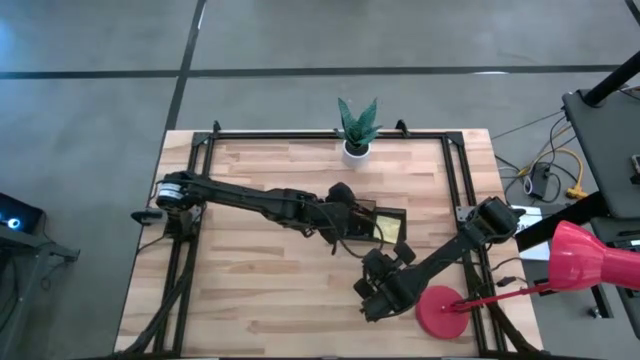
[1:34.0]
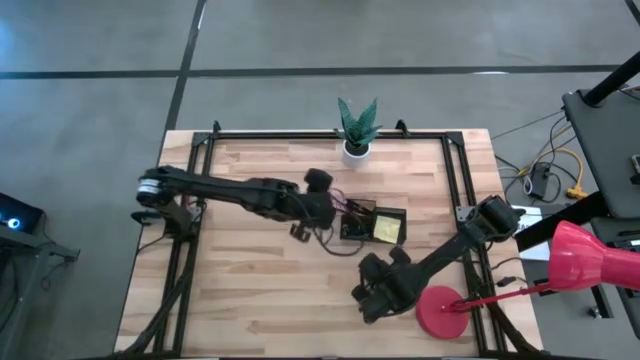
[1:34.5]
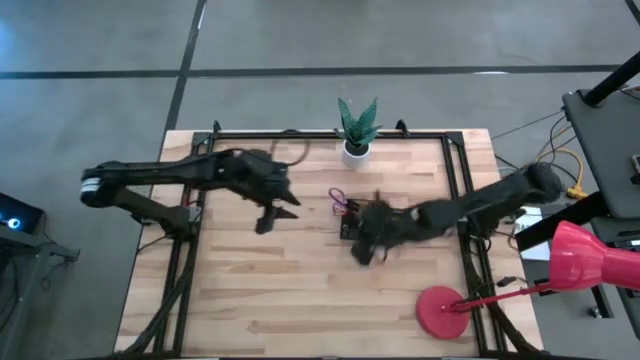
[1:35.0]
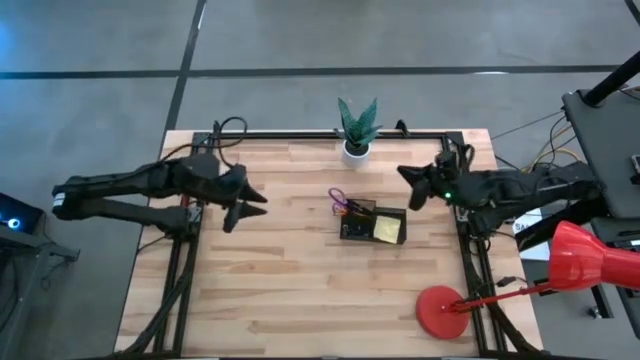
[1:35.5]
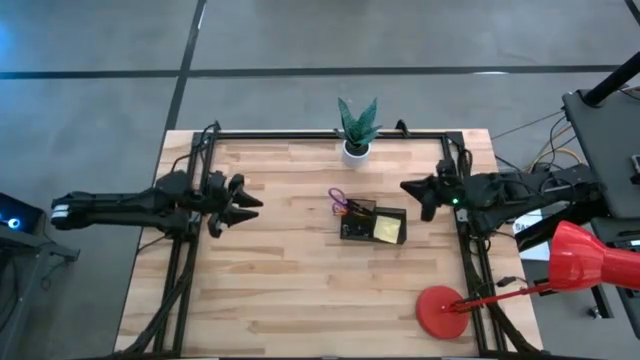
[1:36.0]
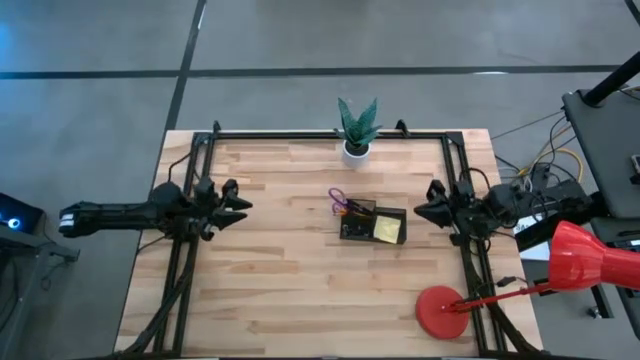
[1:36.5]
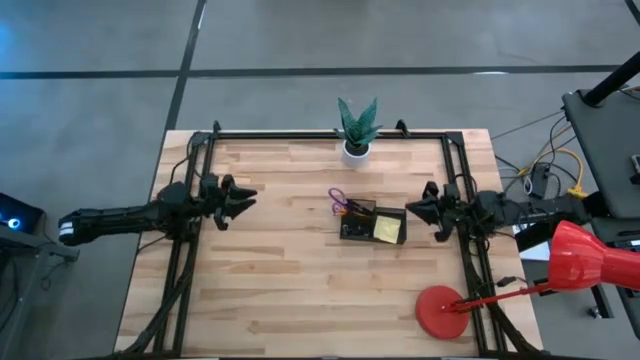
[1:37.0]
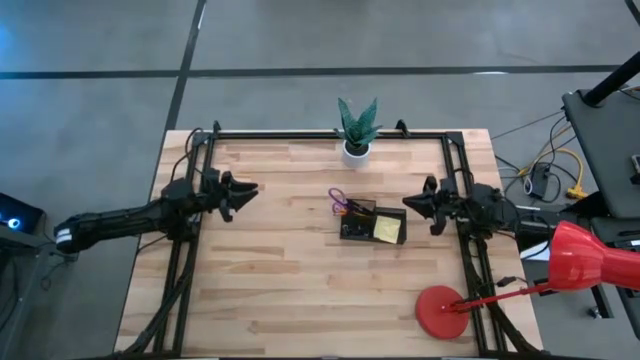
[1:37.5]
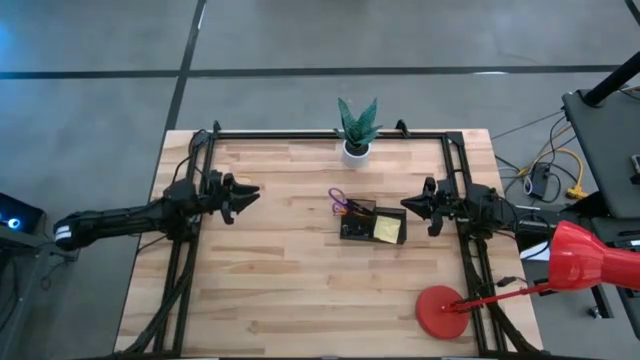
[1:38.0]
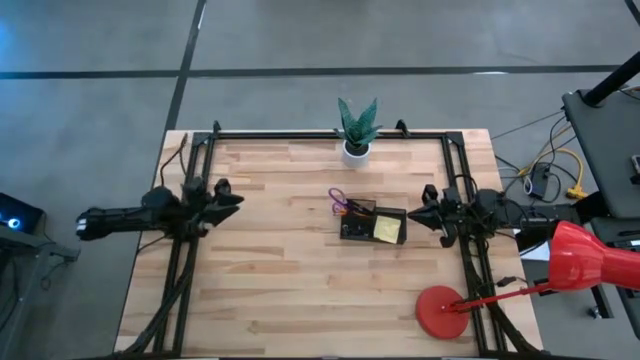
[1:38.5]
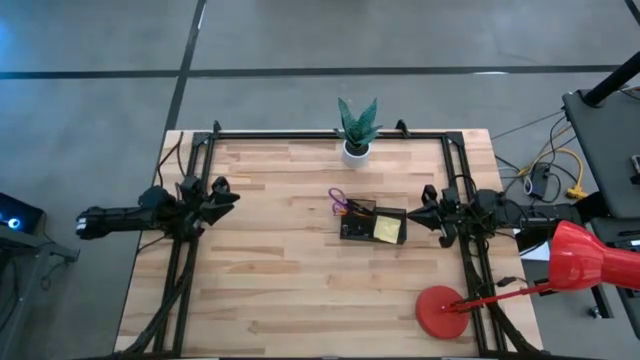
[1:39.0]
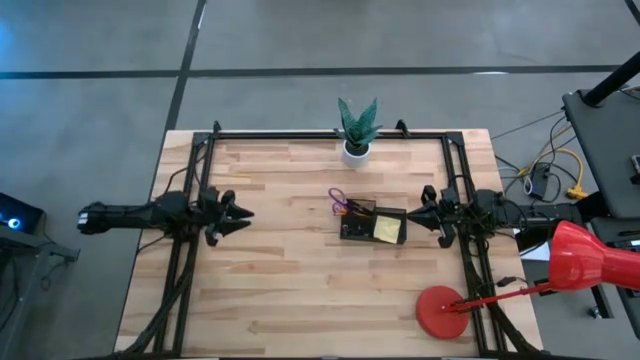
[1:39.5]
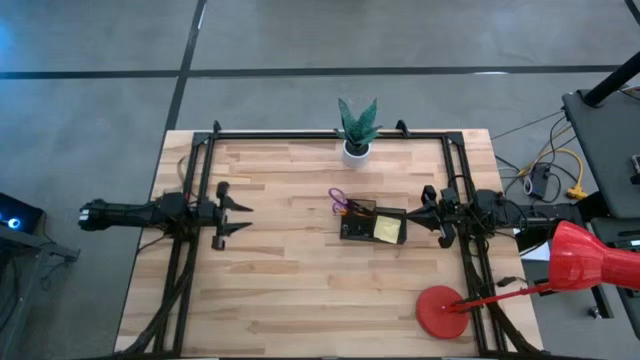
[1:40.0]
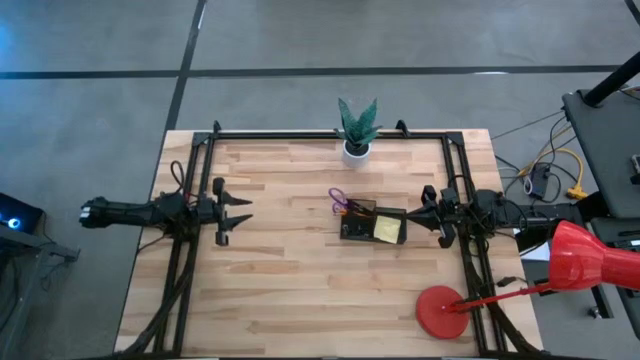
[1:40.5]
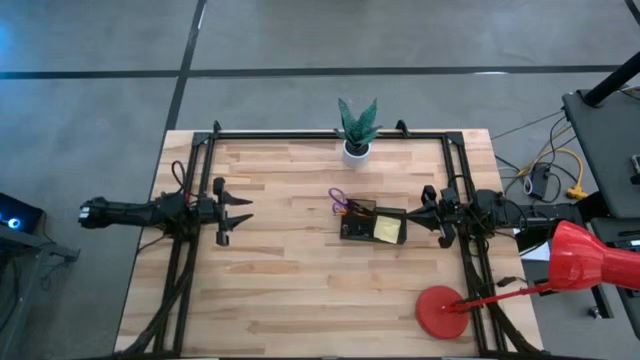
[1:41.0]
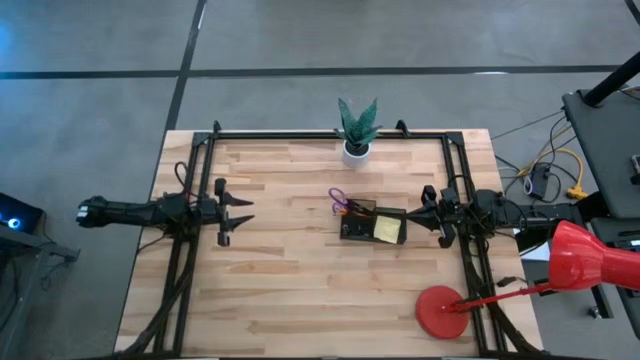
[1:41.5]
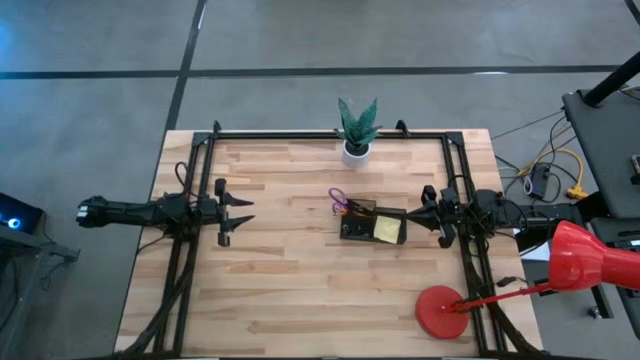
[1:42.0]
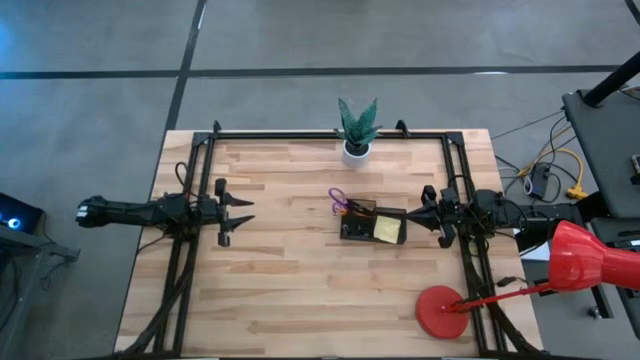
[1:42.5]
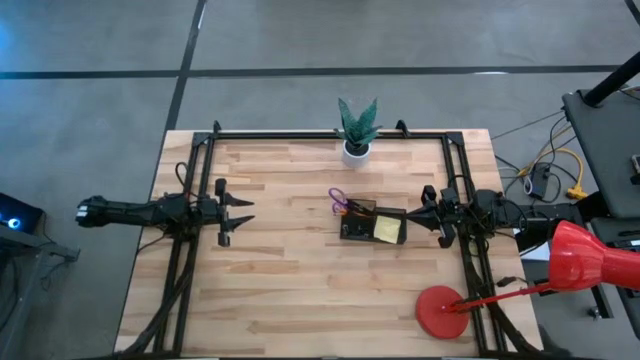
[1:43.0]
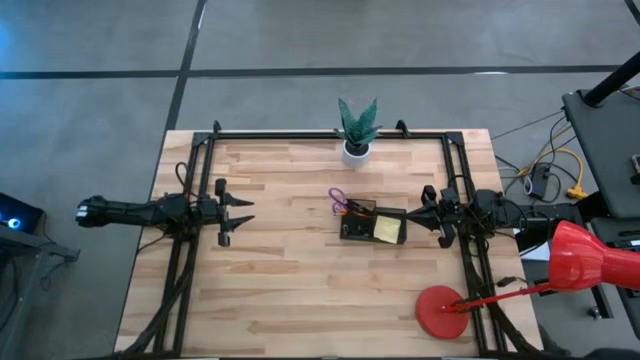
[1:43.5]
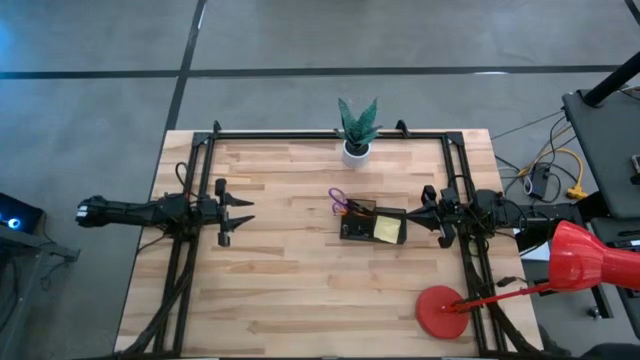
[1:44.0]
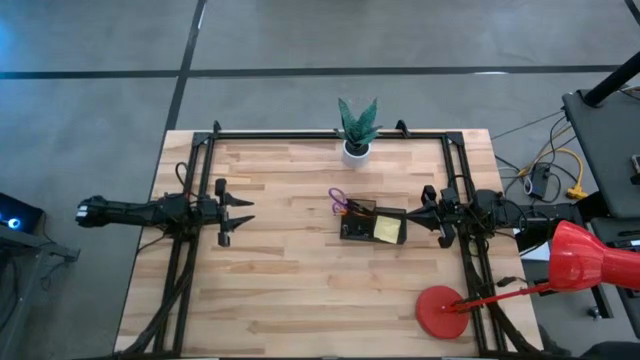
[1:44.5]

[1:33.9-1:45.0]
Task: Pick and place office supplies into organizer
Return to Home Position

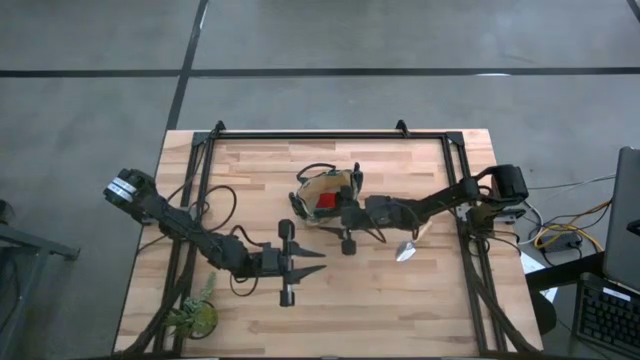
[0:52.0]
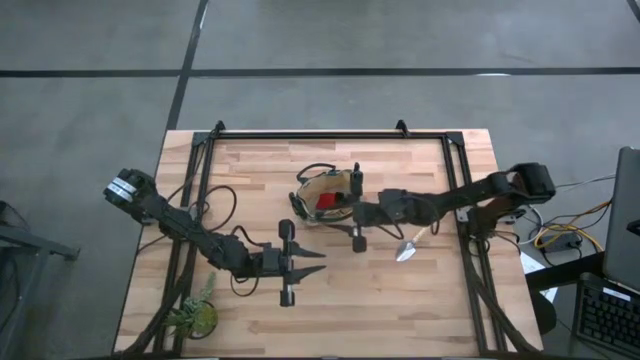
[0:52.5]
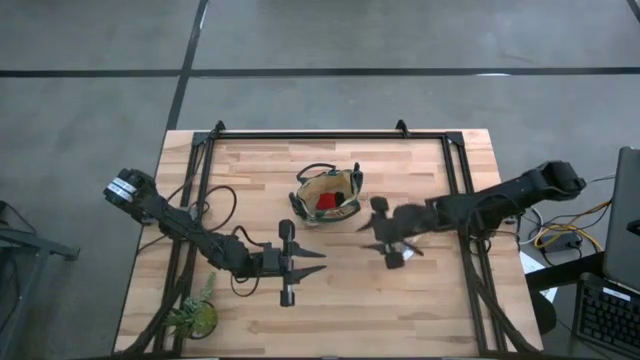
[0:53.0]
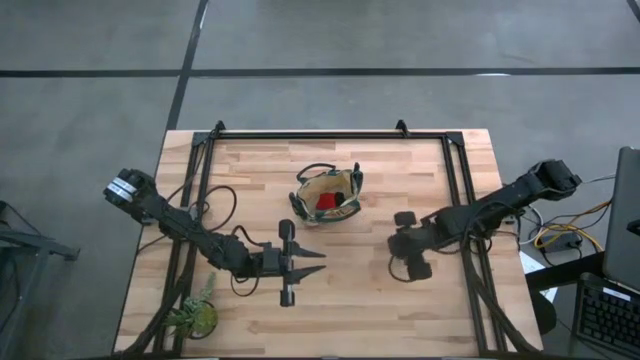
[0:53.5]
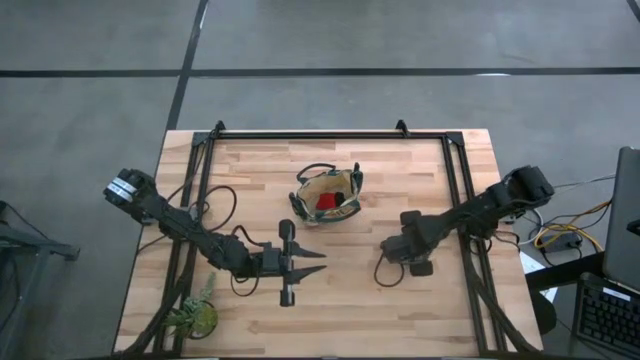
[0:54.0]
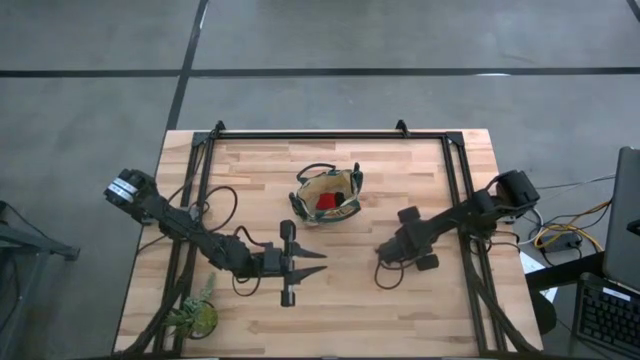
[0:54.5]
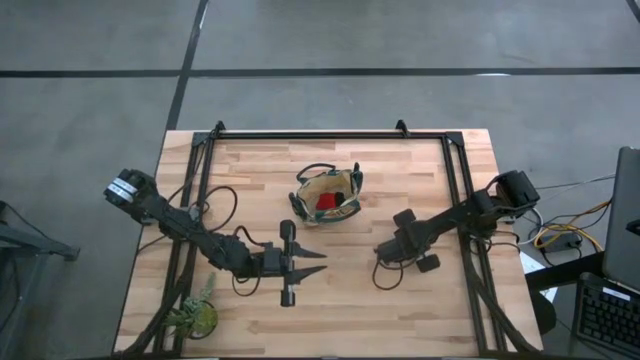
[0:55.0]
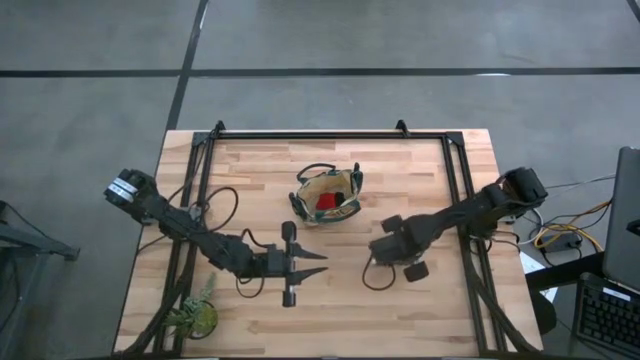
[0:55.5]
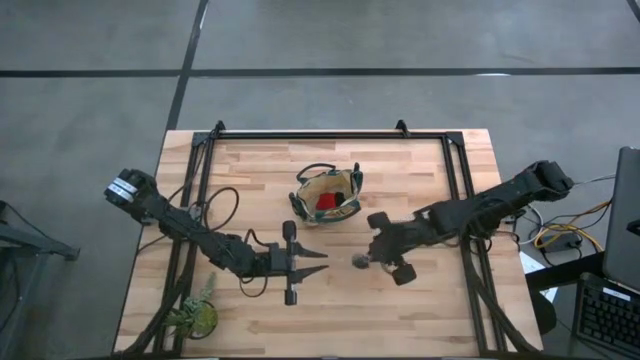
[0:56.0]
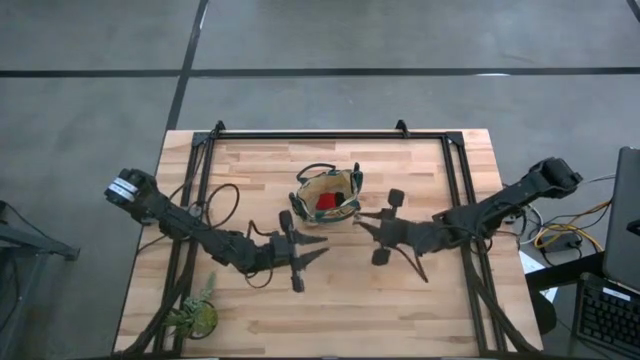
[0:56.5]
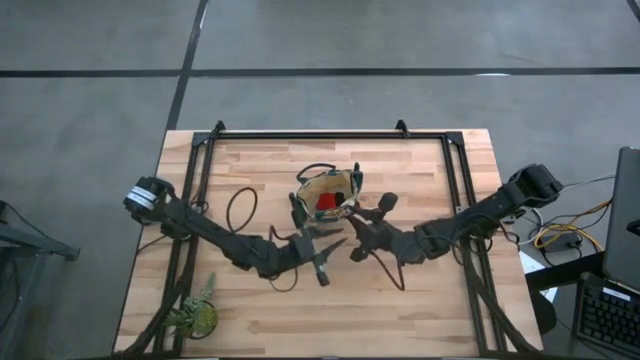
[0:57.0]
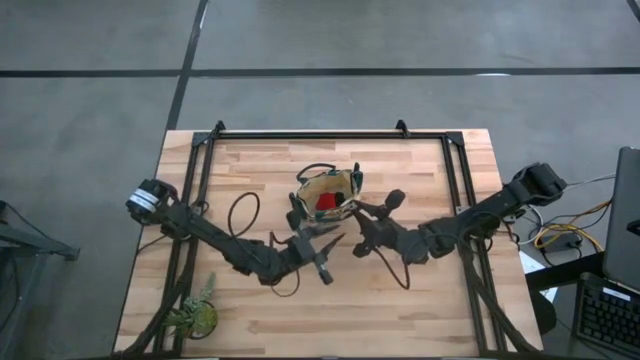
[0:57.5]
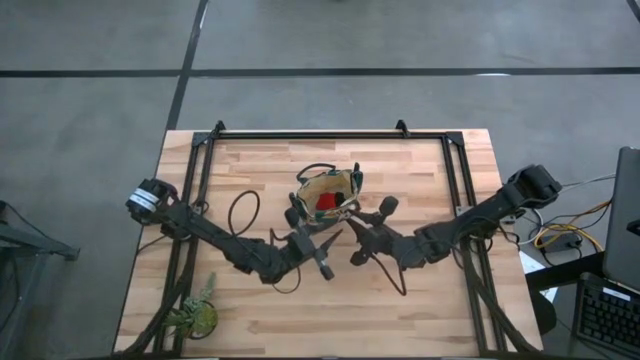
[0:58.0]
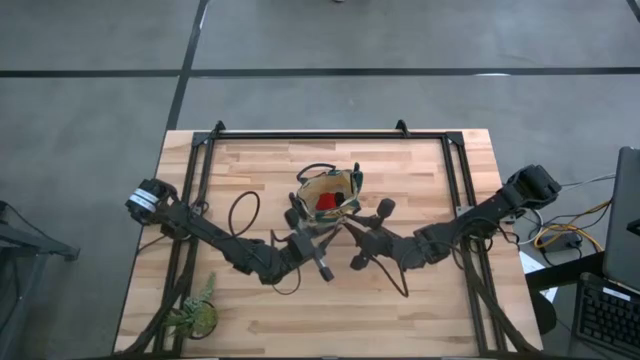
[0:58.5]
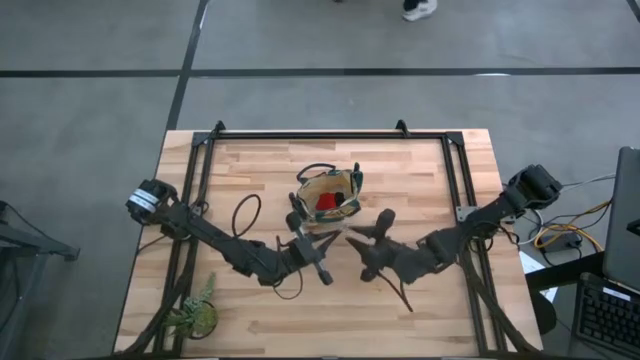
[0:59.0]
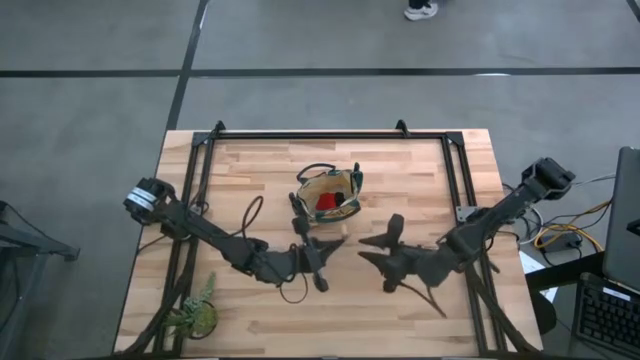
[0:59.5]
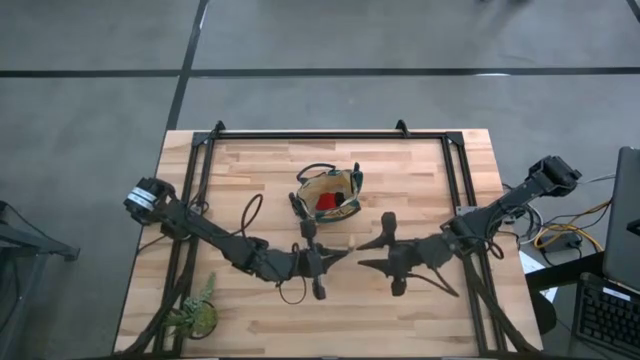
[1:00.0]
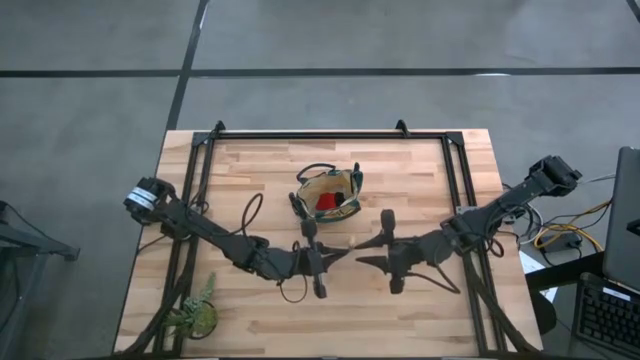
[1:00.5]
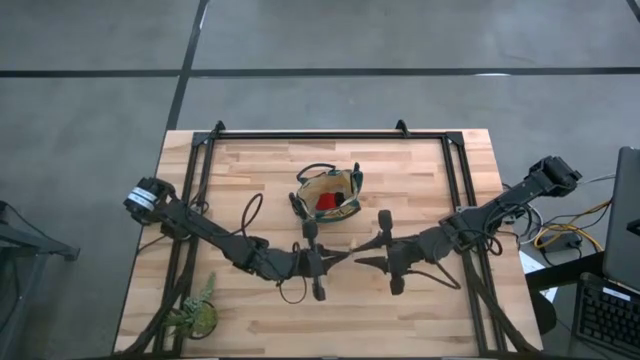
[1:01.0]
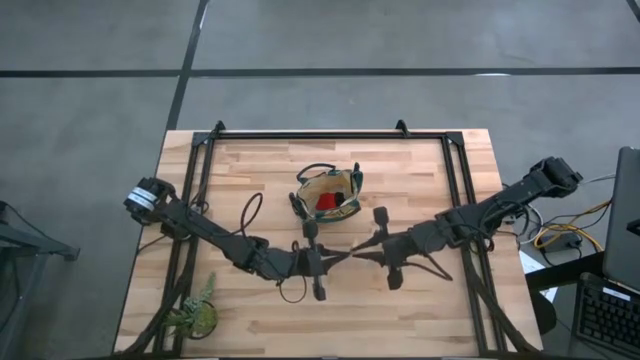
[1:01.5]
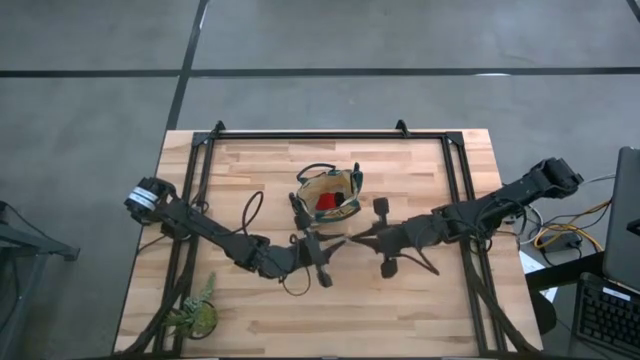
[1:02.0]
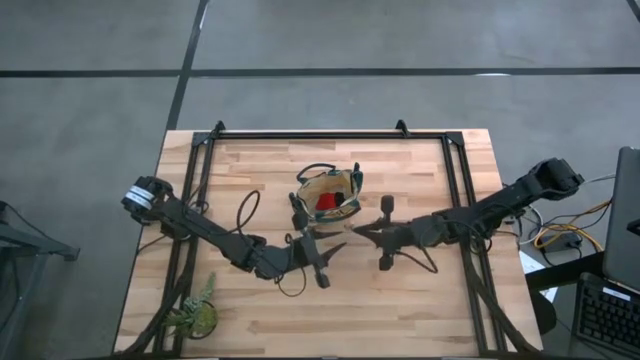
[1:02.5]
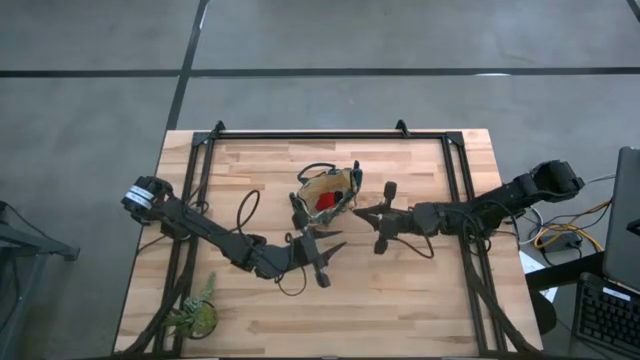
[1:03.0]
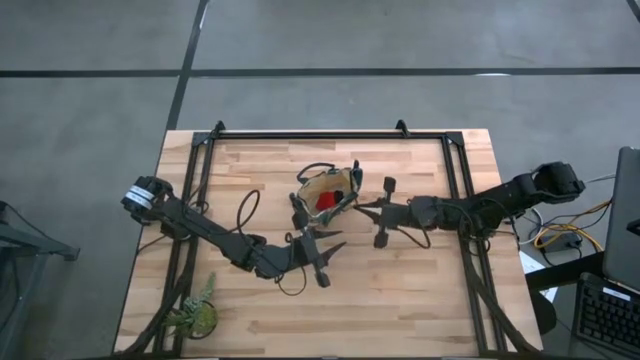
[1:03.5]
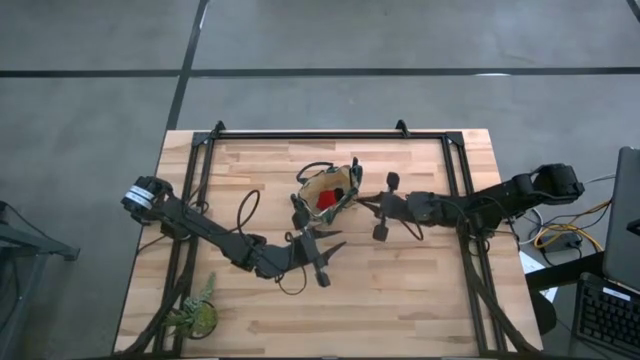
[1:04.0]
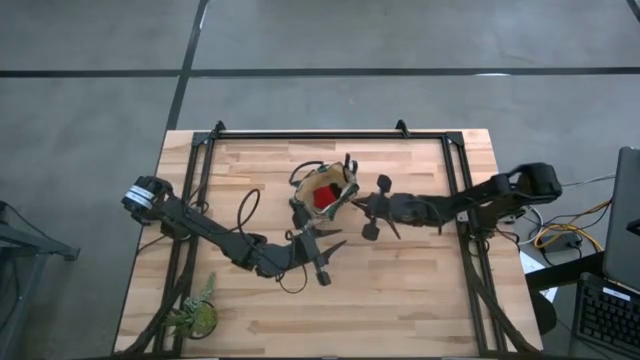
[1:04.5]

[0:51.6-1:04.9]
Task: Pick & Place Garden tools in Gardening bag
Put the brown trowel into the gardening bag
